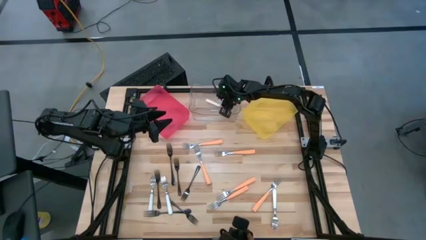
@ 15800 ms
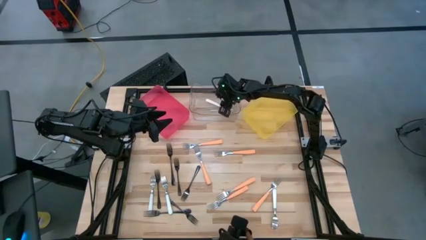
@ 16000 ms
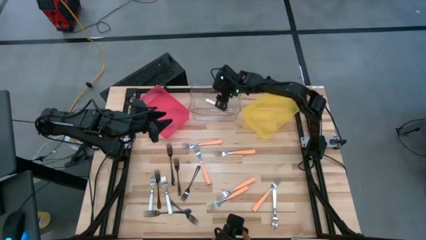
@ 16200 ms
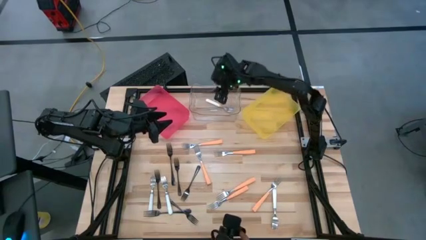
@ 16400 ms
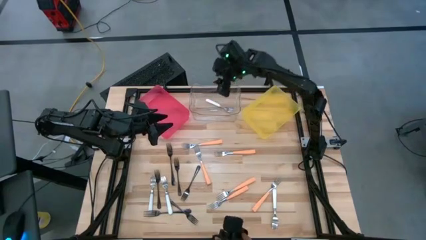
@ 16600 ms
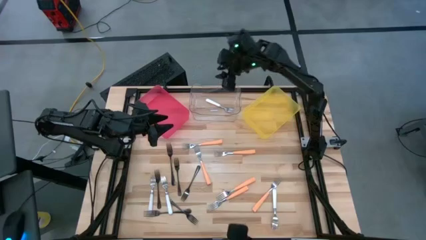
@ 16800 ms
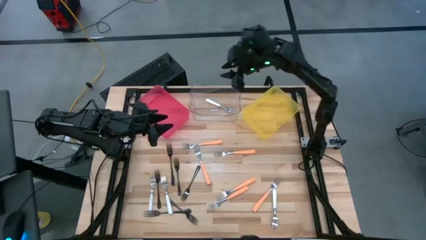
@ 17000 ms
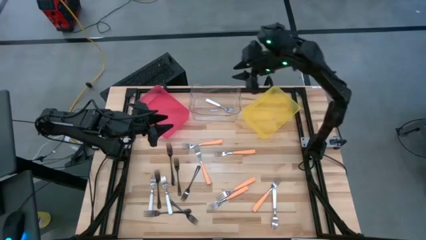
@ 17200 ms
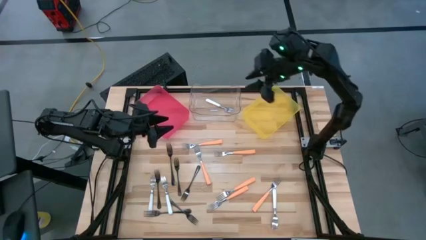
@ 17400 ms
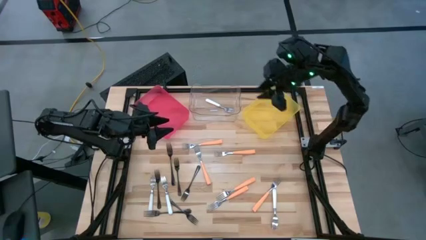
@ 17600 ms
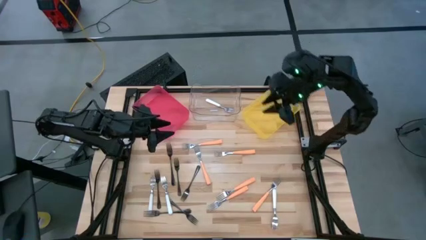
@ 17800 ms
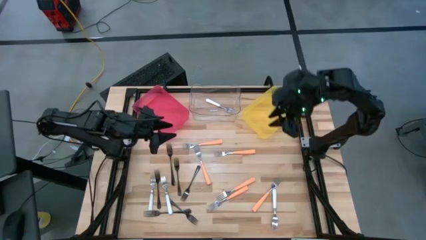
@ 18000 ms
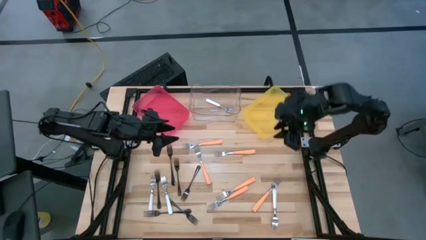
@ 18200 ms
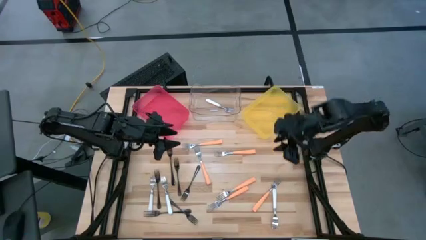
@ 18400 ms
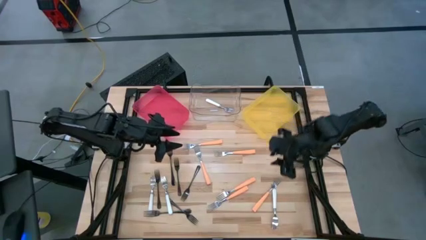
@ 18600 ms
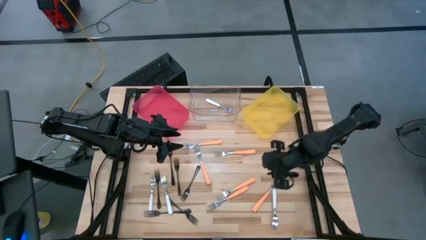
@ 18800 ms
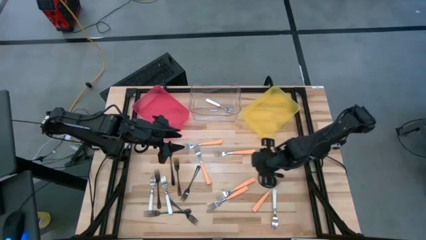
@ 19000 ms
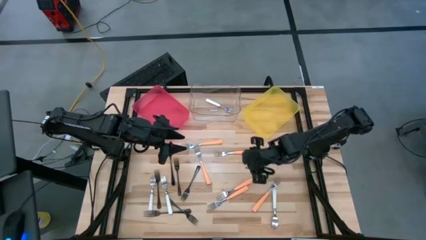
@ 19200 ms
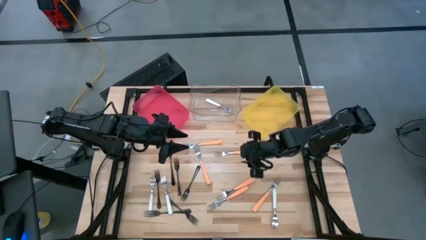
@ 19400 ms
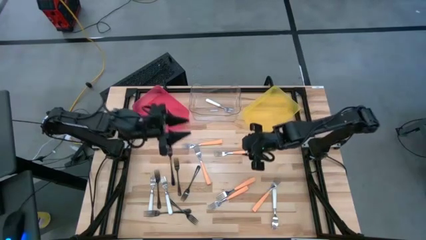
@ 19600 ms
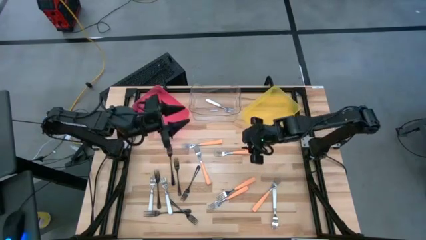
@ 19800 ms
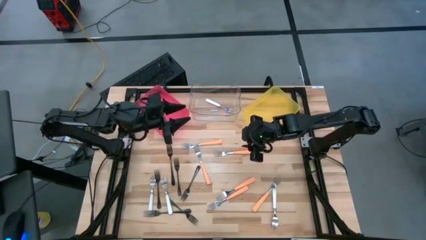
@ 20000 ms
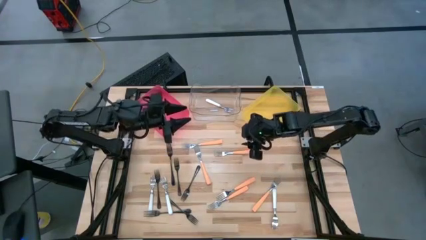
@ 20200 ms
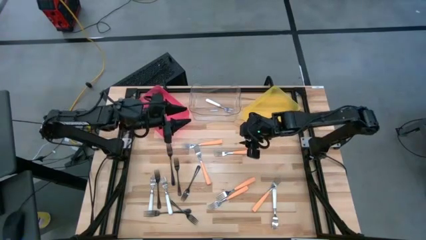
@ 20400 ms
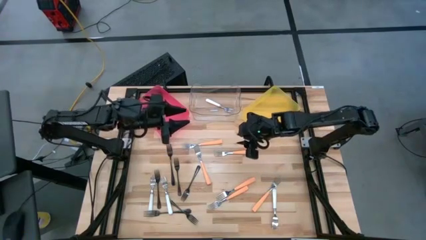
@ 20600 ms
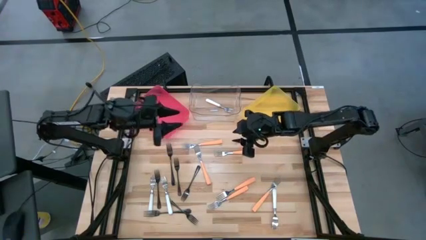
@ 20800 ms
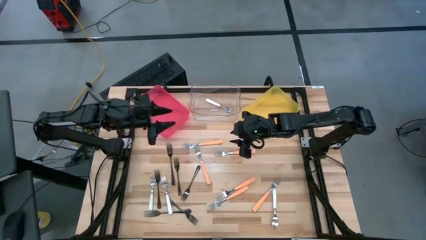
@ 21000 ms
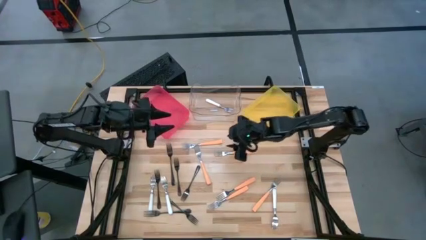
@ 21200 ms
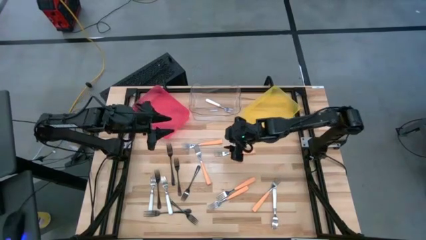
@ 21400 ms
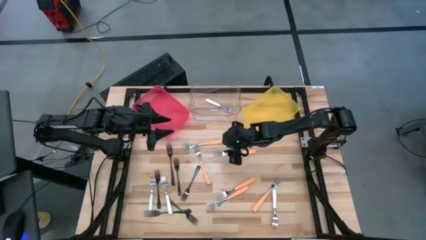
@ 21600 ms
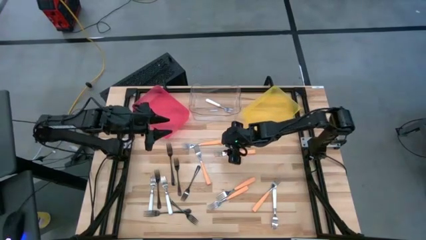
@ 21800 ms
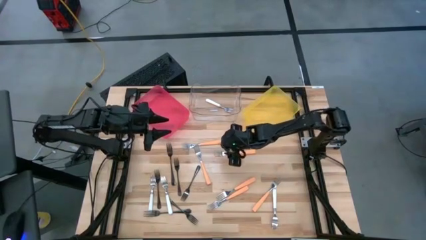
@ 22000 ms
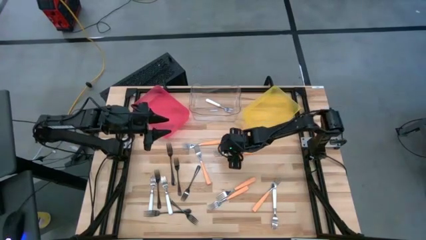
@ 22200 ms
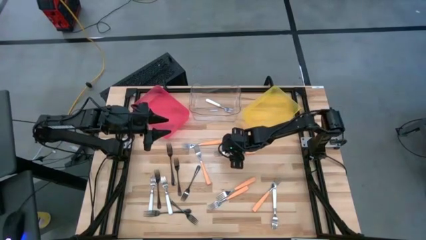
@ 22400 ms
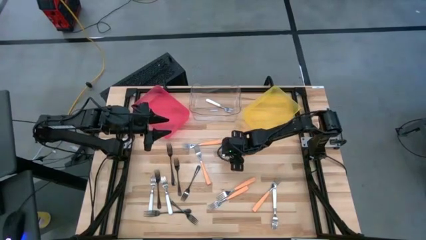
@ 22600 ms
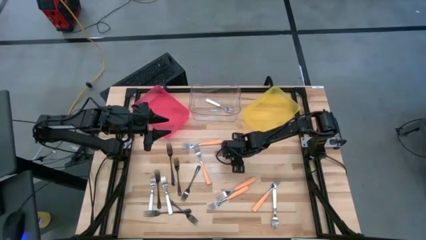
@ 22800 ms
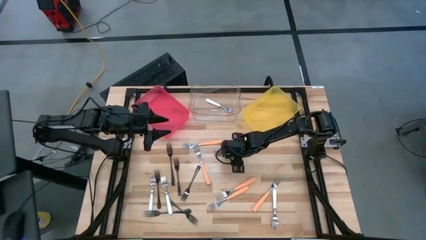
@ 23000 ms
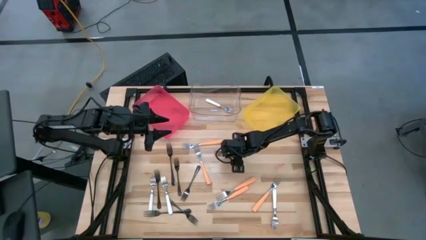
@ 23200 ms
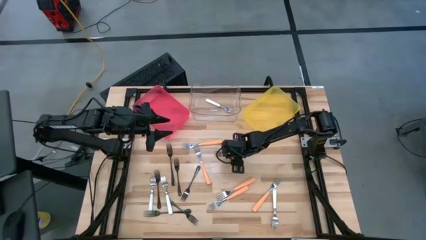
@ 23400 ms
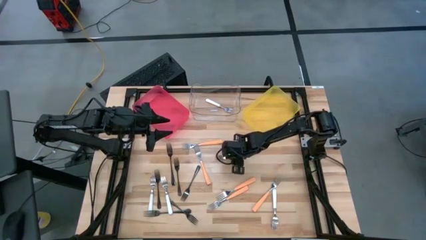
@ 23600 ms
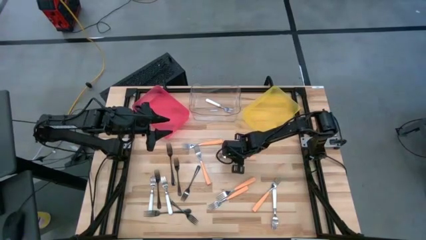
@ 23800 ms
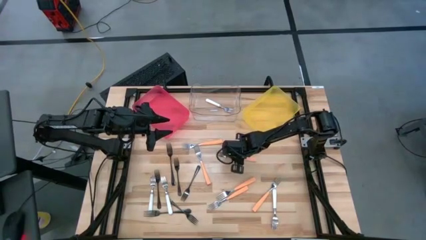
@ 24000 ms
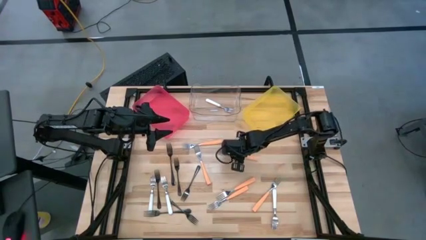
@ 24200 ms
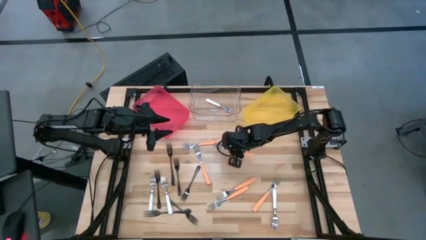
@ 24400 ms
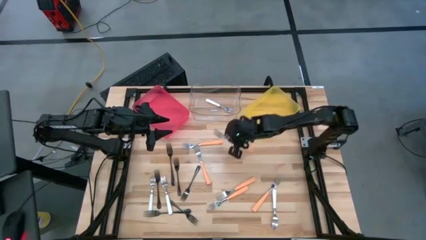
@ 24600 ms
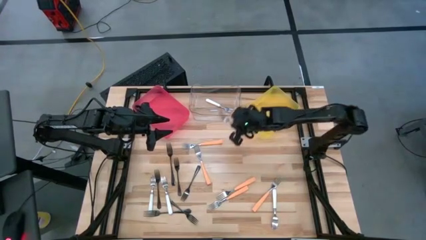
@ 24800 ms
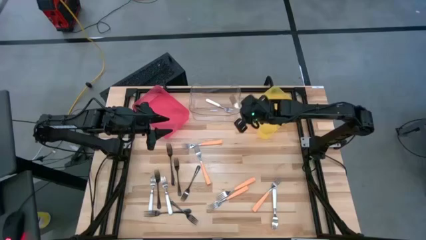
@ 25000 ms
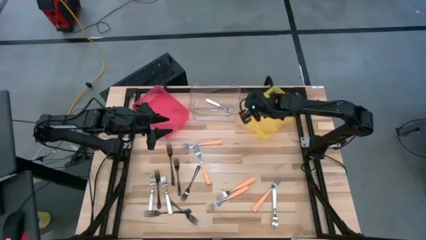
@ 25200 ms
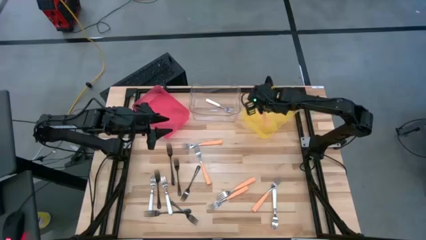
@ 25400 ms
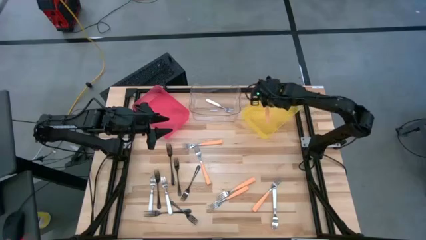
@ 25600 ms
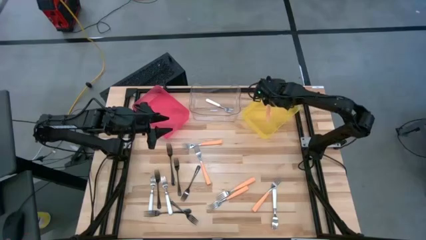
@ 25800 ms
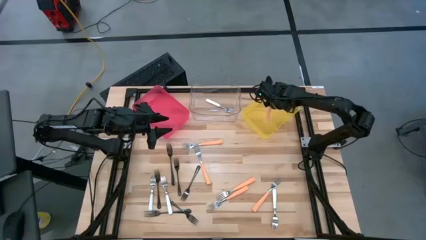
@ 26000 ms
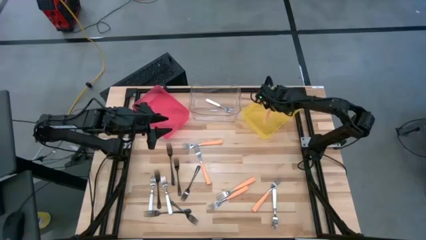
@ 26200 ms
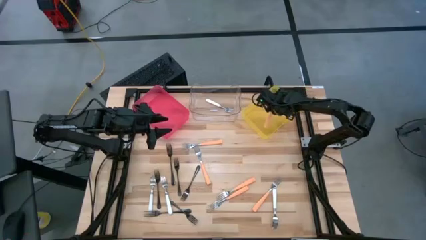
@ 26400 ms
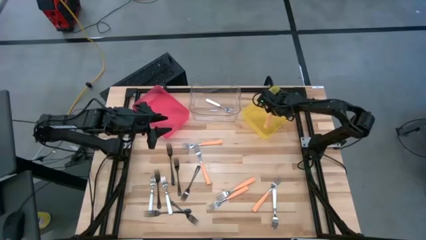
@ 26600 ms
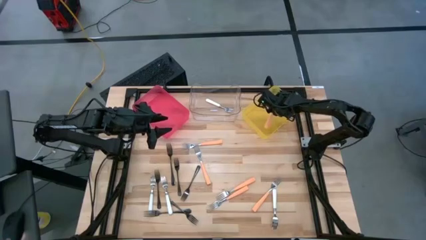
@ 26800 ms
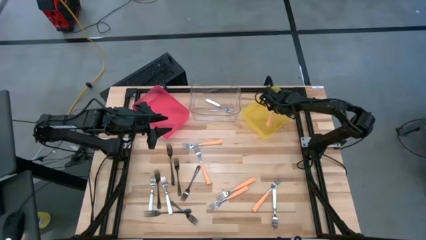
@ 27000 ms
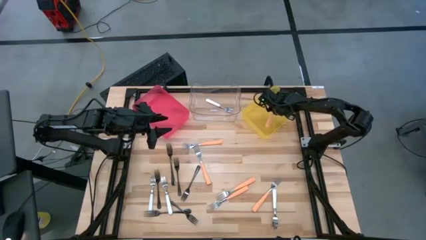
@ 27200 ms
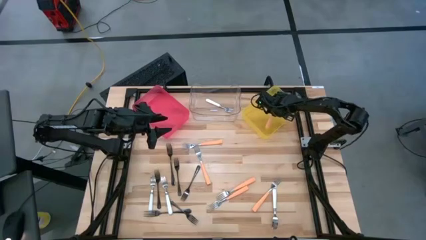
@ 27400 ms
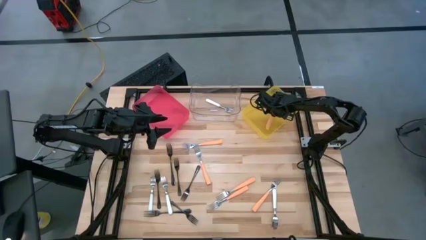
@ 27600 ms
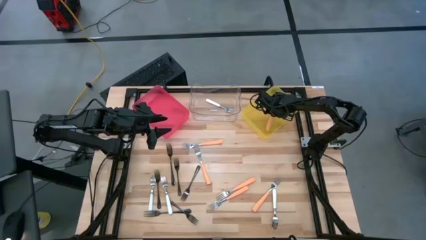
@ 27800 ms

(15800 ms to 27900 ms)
Task: Sort silverware by color (type)
Put the orange fork into the yellow bin
